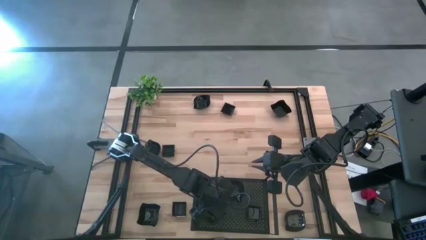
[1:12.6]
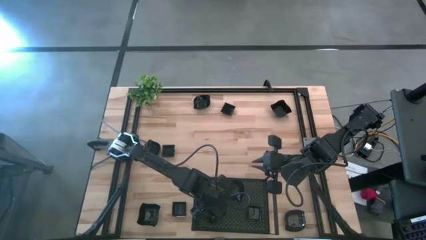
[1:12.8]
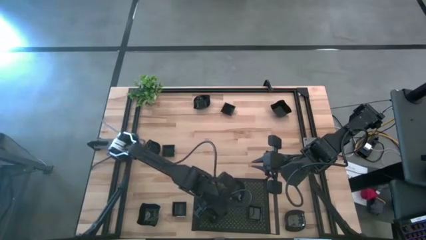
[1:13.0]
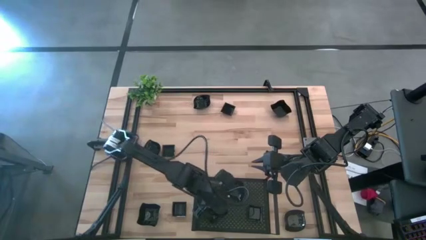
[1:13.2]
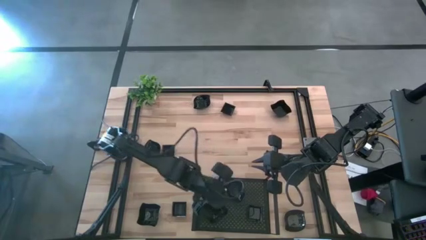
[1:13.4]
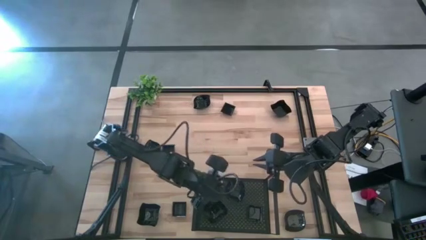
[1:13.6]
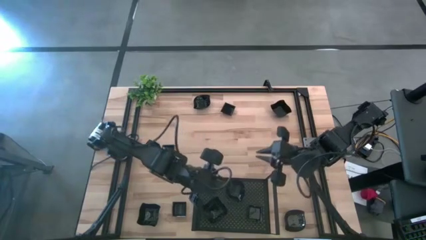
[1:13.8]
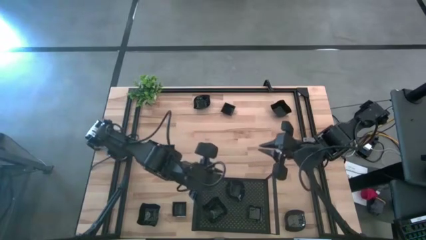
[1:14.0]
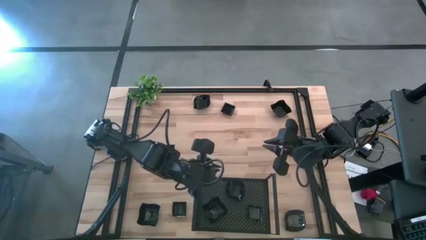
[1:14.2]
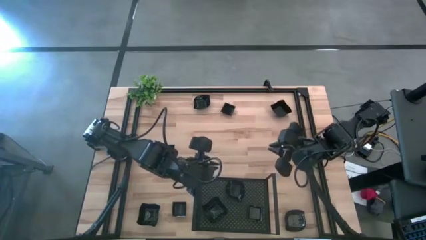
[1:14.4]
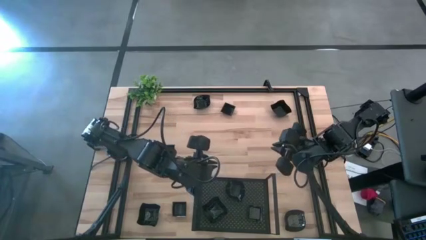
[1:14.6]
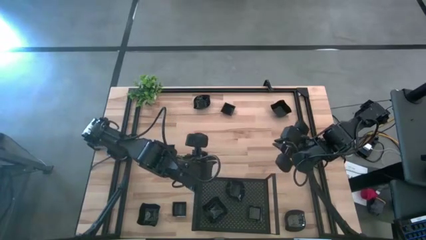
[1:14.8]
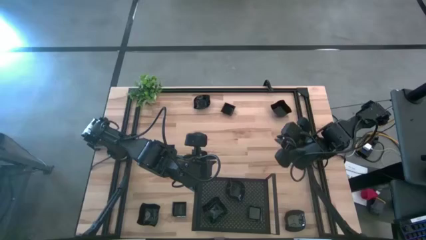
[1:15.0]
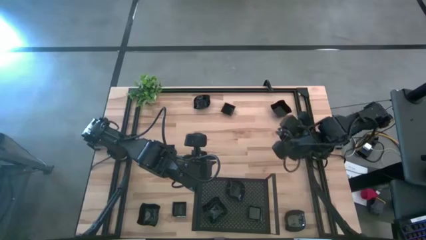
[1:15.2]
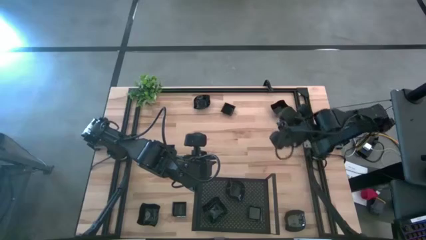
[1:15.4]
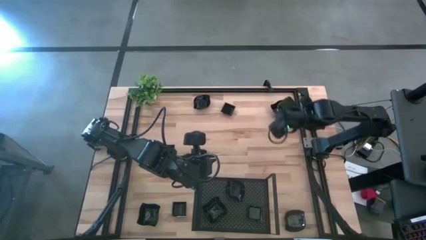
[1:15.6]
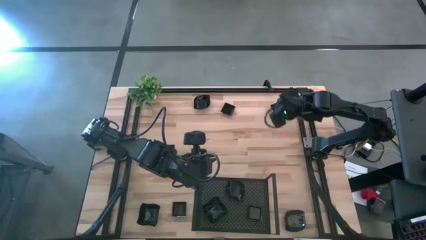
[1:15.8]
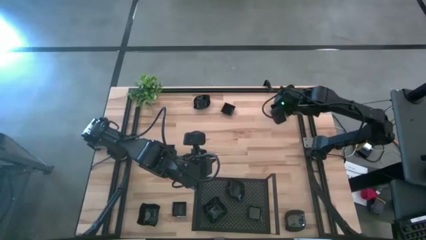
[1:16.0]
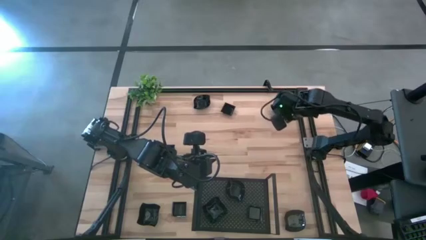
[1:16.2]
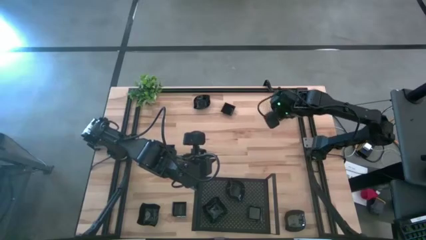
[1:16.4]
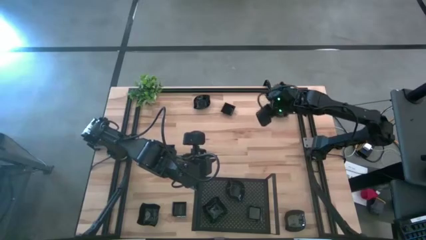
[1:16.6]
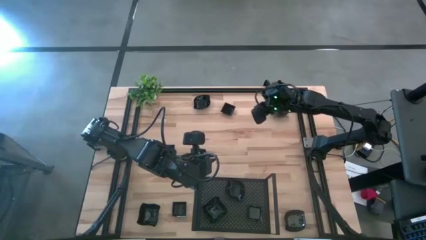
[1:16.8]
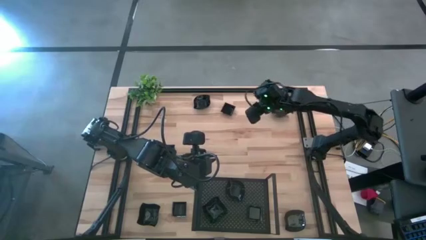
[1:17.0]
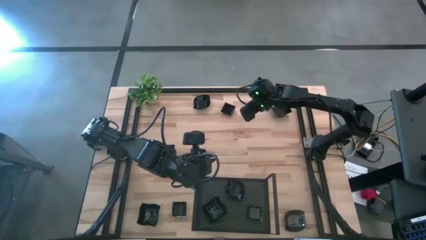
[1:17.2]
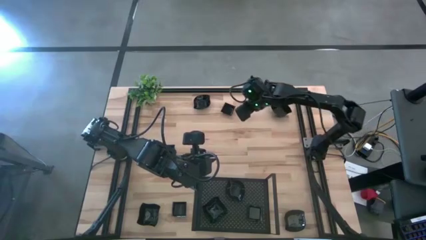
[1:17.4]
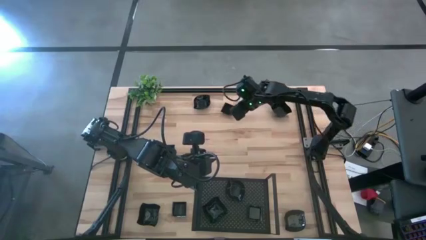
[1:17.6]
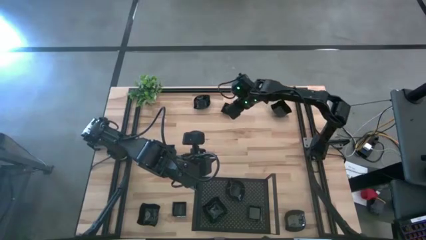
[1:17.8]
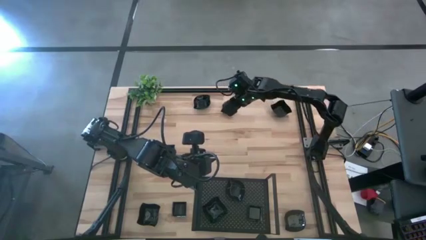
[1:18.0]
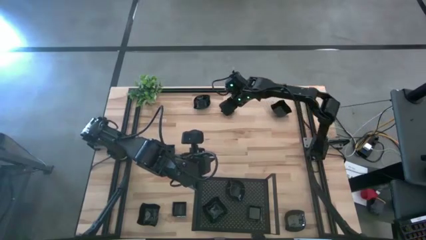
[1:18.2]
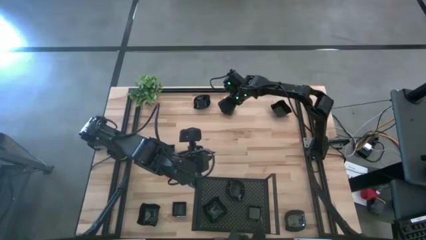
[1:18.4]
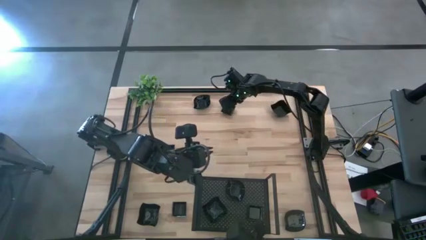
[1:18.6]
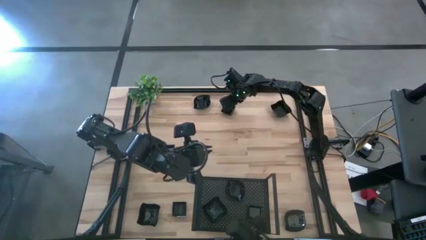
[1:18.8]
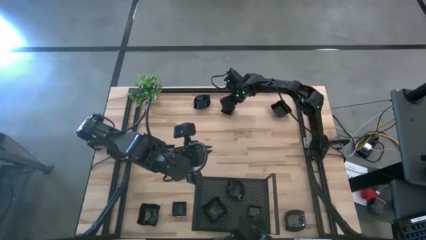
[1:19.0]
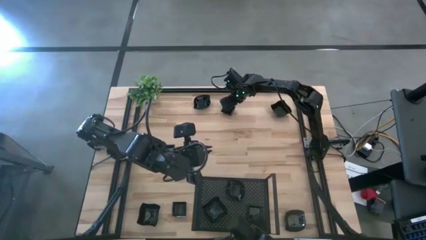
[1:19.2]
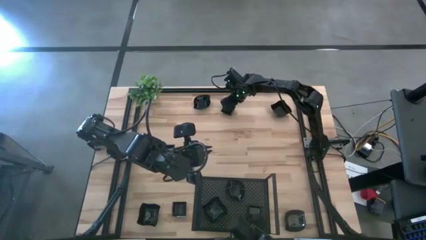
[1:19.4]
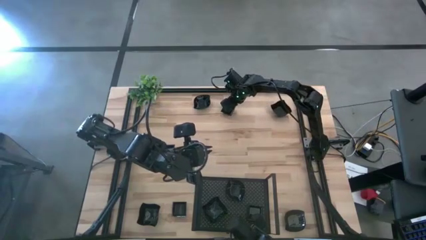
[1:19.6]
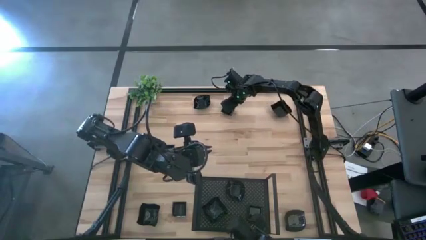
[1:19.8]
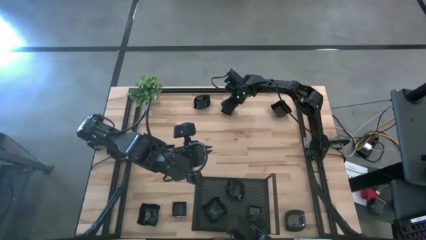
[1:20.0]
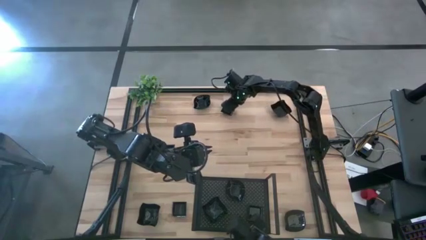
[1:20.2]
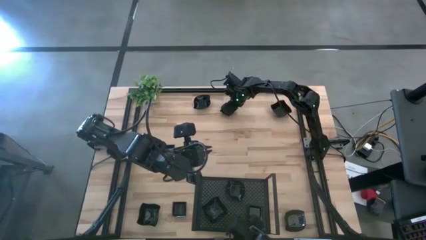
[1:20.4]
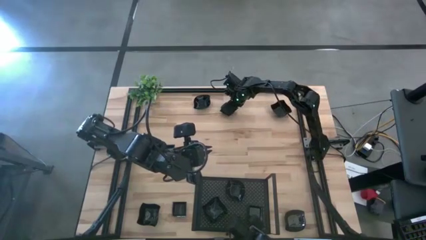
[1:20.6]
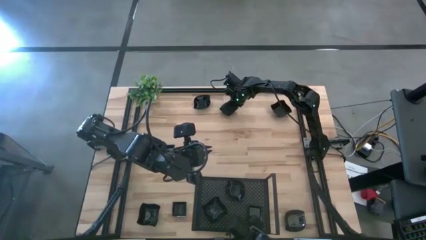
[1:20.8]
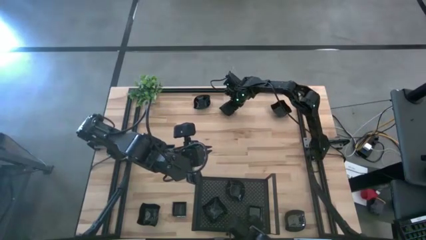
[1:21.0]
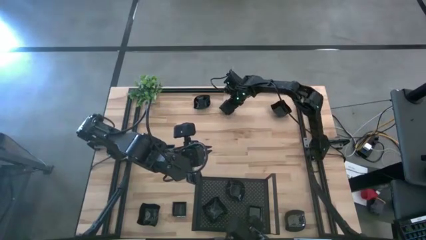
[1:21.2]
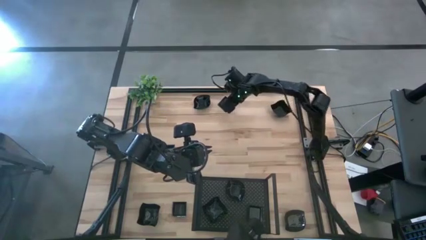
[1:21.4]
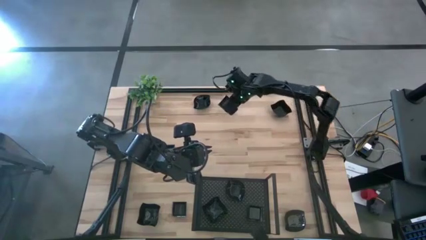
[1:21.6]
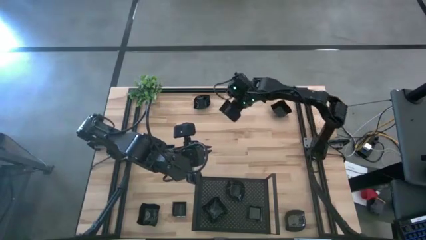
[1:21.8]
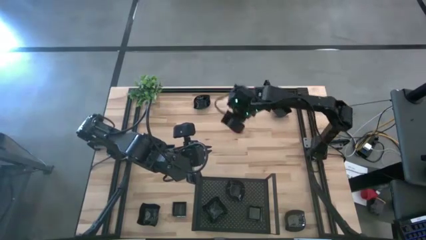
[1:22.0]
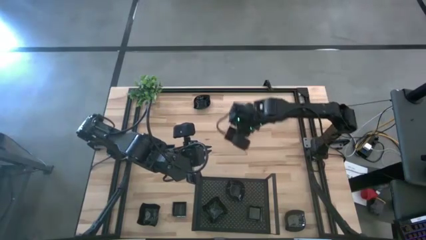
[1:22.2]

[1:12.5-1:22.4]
Task: Pick & Place Mini shaped plates
Stack the square plate on top of the other square plate on the shelf

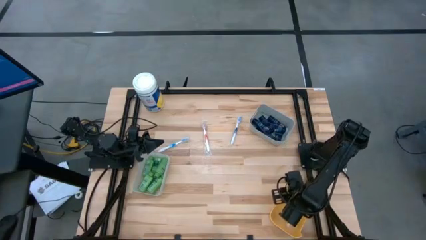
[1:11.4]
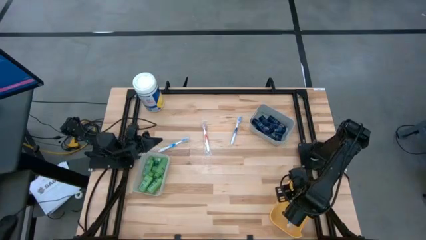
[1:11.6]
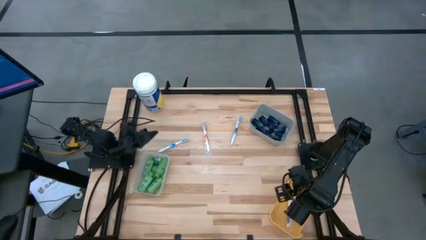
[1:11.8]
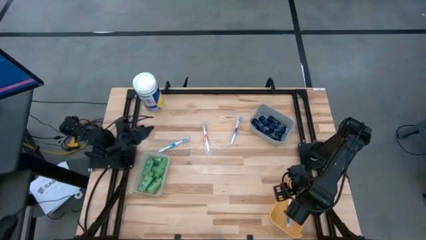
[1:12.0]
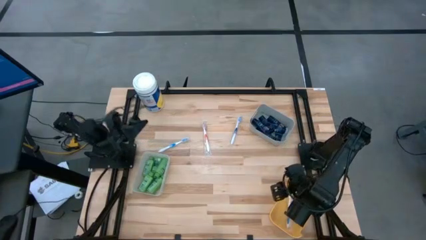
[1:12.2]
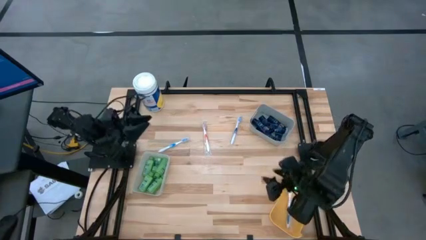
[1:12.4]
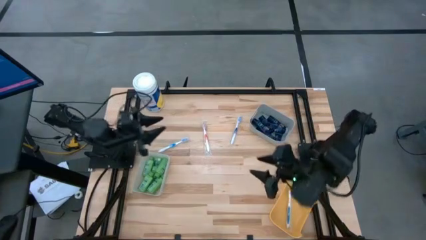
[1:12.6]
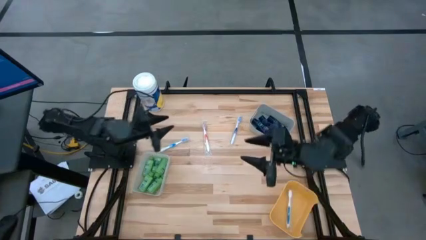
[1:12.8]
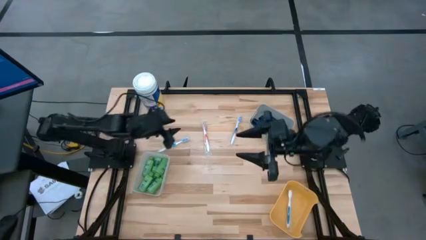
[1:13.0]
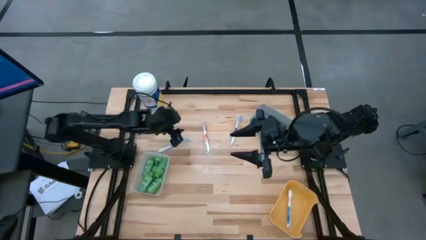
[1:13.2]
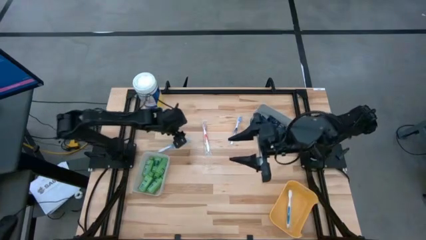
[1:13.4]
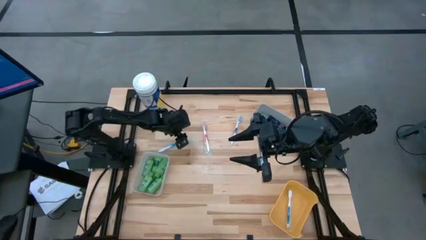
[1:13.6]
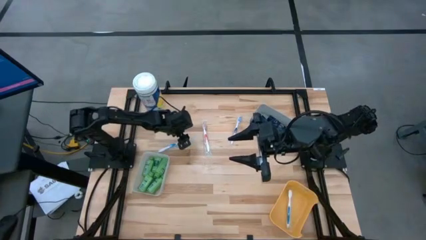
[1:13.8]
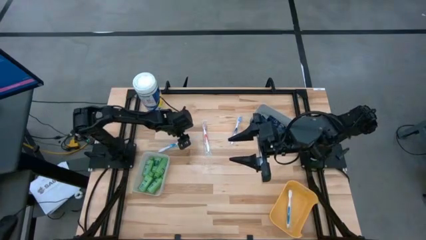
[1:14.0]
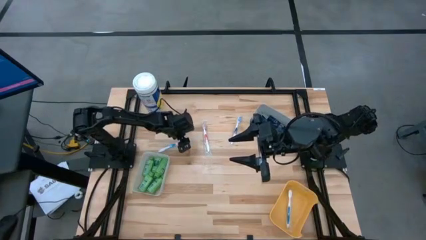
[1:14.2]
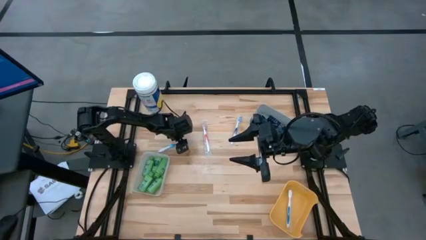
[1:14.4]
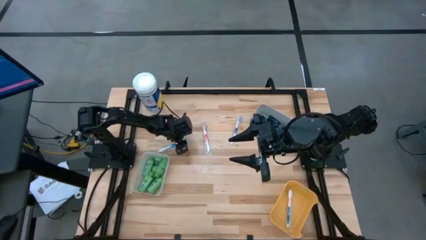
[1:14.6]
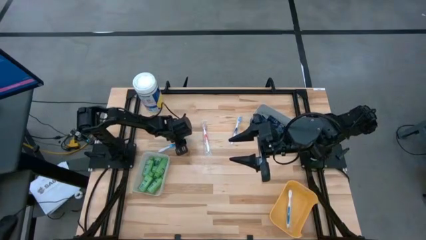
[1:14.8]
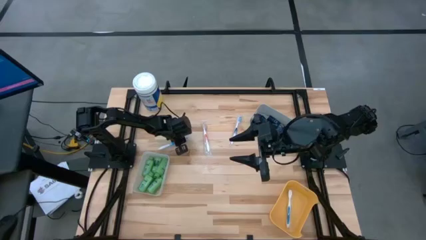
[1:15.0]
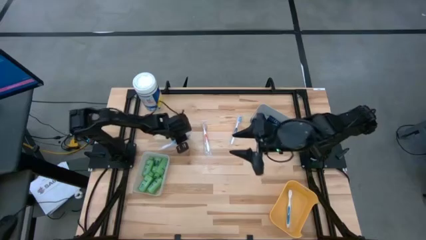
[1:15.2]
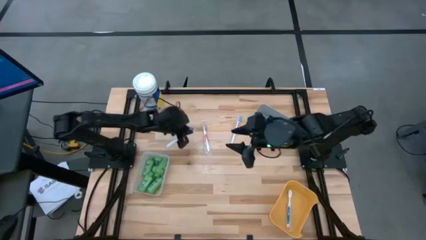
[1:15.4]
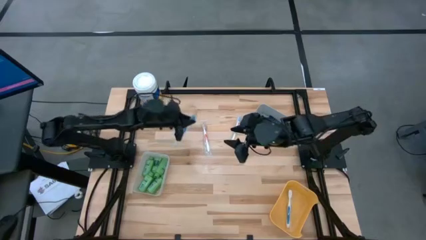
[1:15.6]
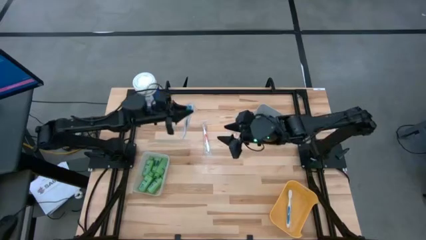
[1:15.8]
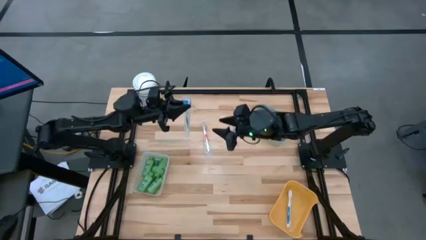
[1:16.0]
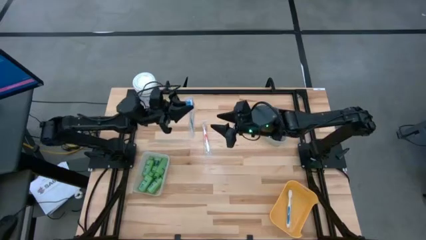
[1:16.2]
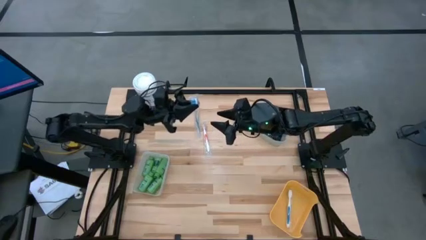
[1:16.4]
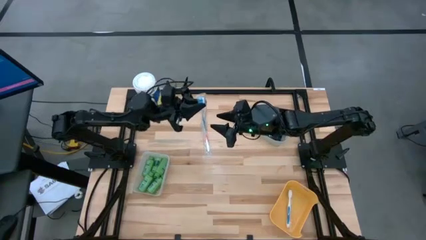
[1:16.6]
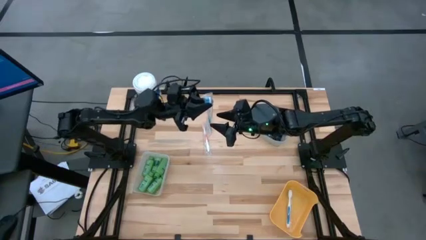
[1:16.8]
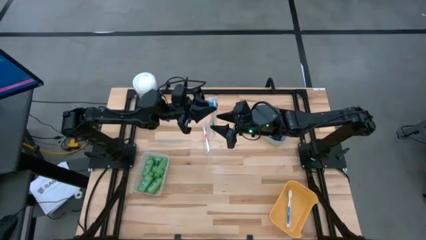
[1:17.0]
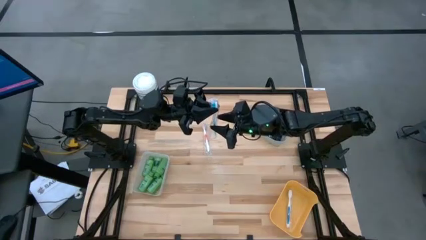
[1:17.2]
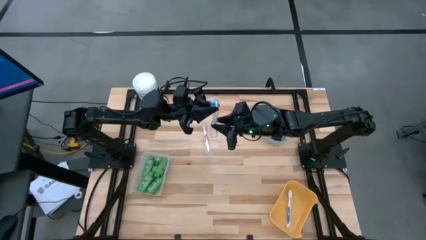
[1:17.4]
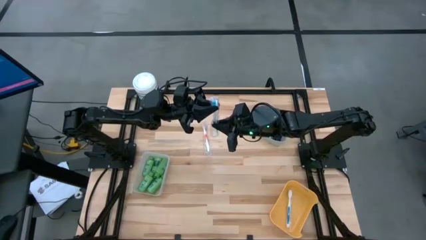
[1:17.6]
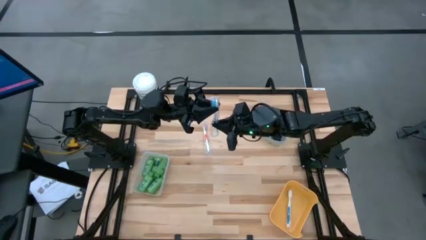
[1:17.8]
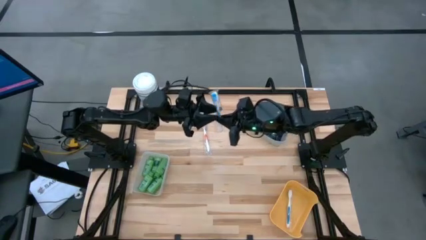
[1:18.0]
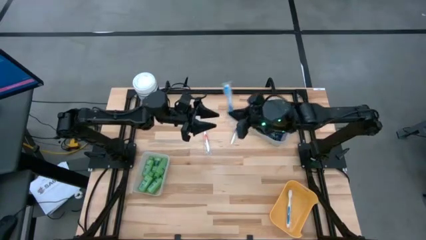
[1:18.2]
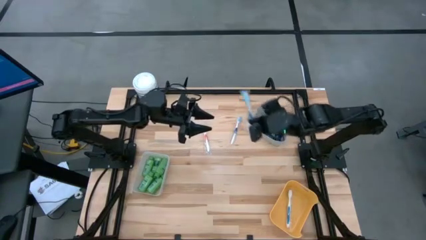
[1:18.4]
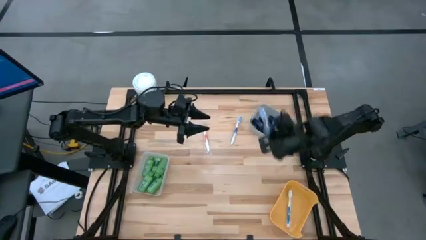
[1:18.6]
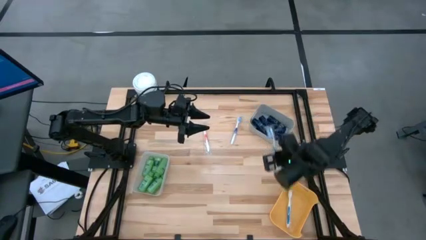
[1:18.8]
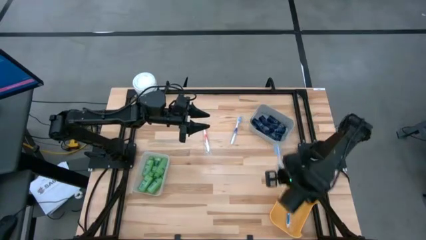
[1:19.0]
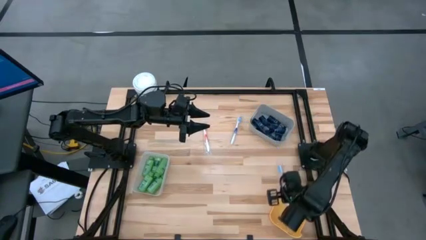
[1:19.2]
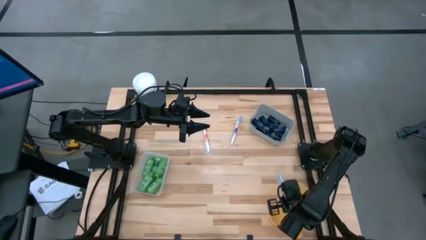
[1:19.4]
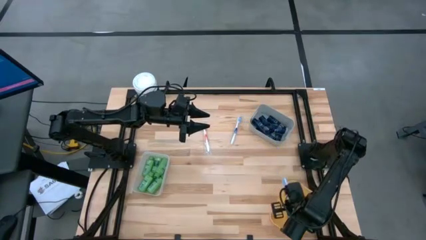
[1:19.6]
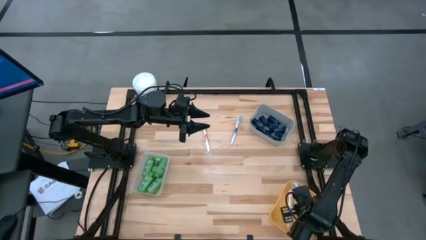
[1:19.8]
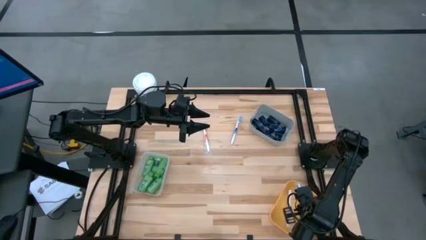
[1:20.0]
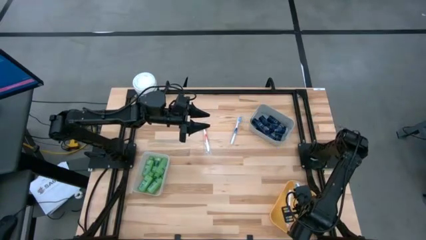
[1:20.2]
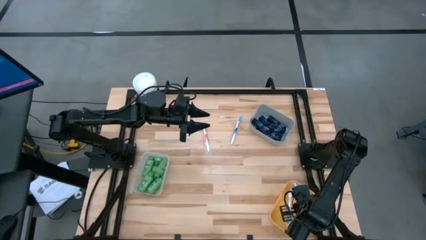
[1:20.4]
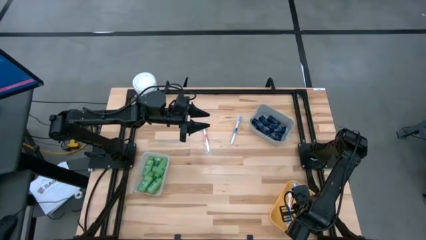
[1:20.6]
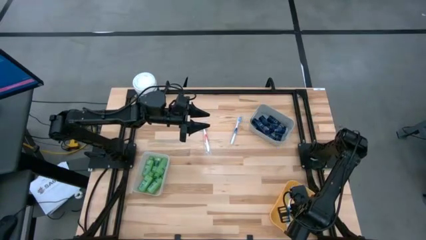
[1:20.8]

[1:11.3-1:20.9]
Task: Pick & Place Travel size toiletries
Put the blue toothbrush into the yellow bin
